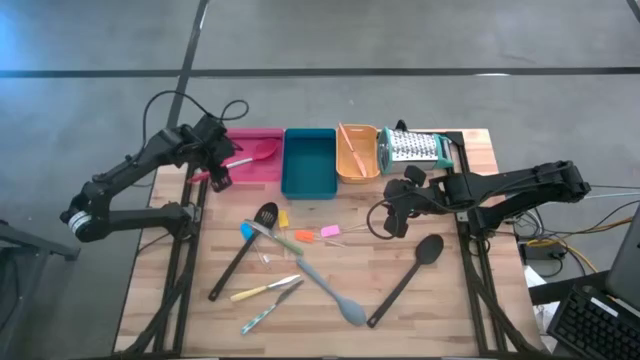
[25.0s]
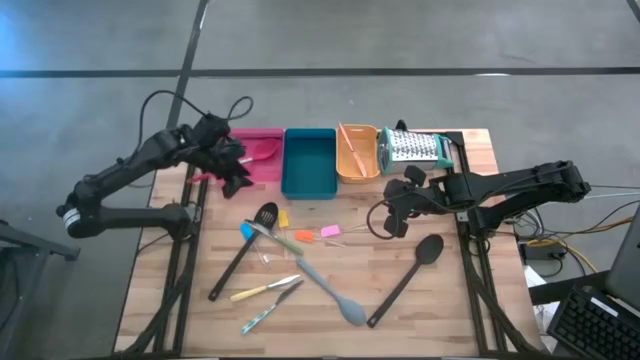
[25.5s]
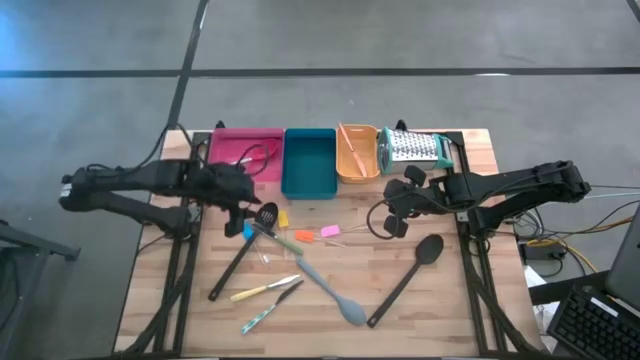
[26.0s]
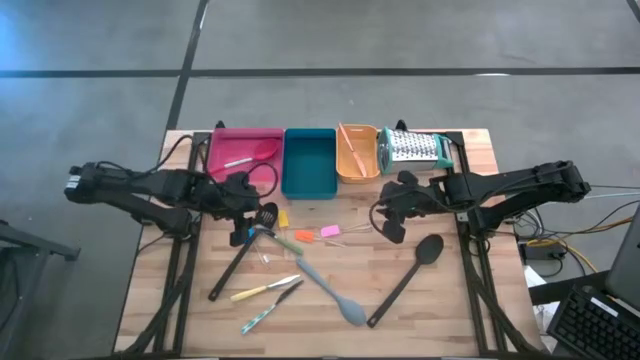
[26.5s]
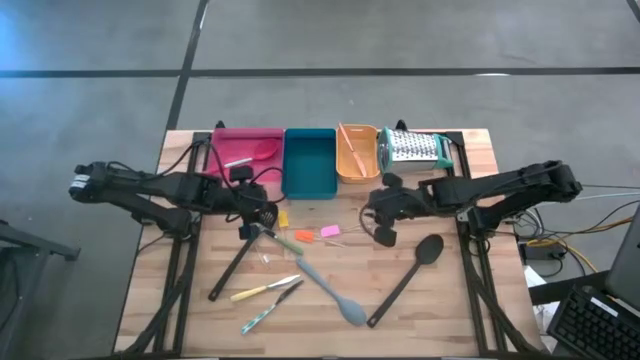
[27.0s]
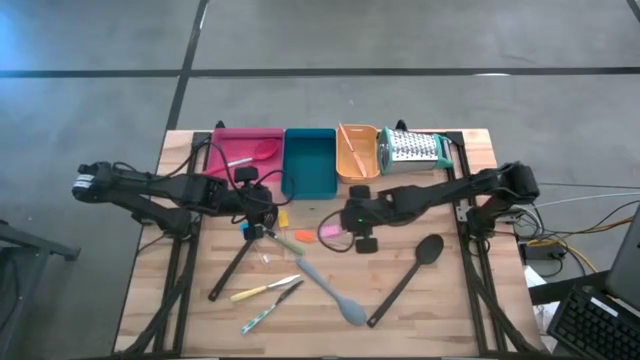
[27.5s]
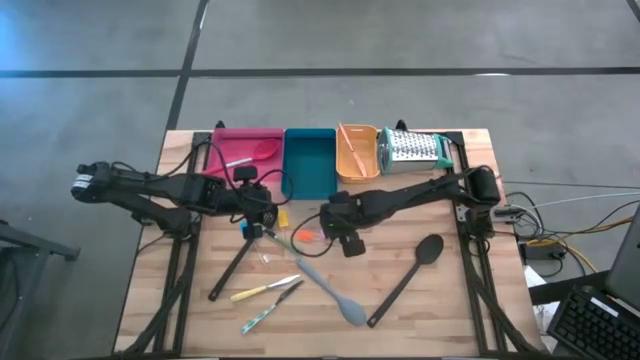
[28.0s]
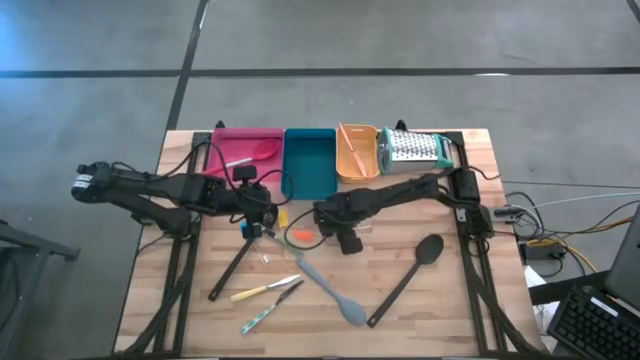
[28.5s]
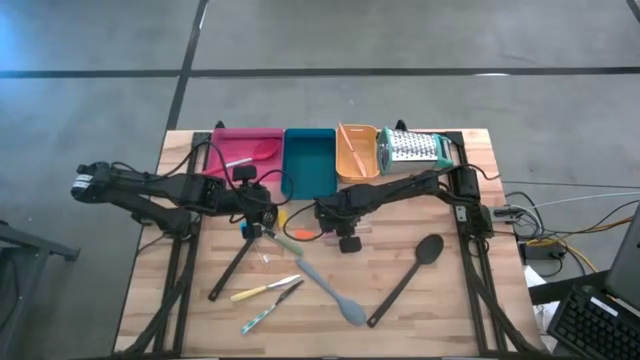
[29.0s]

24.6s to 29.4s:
Task: Pick & Place Kitchen Items
Put the pink spatula into the blue bin

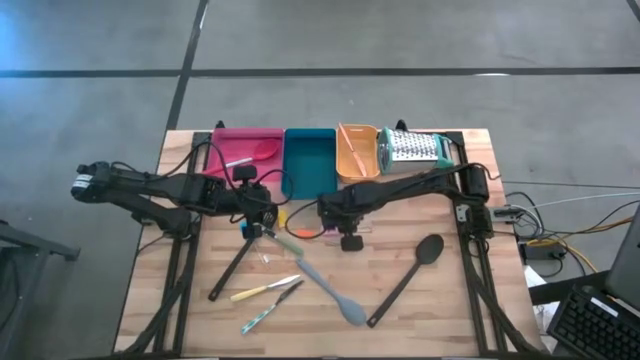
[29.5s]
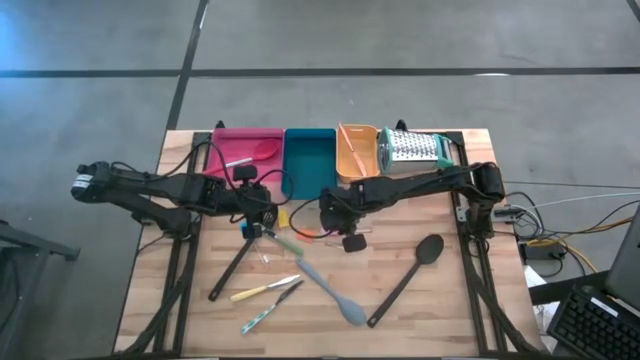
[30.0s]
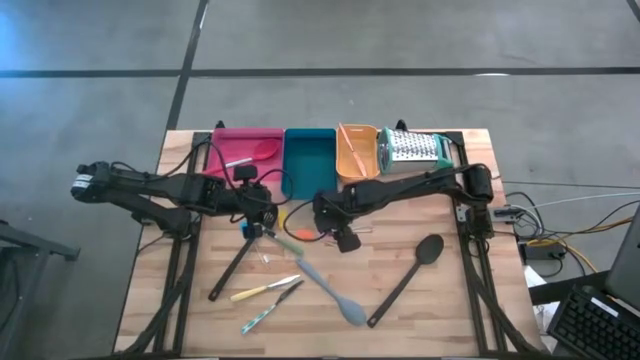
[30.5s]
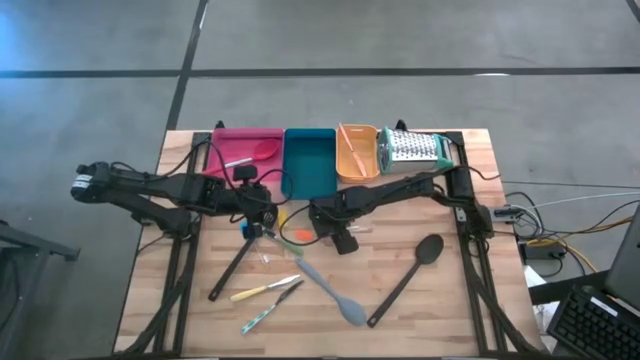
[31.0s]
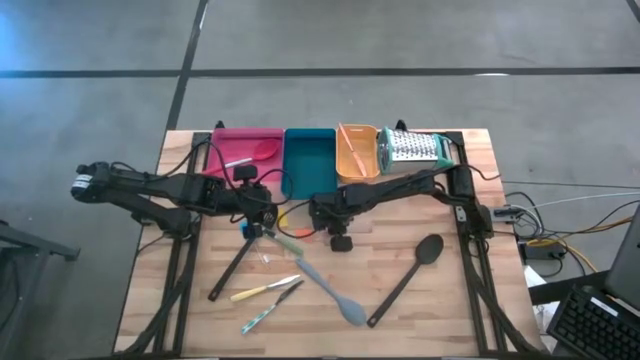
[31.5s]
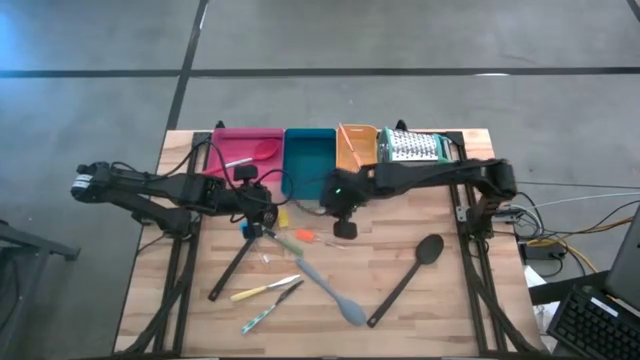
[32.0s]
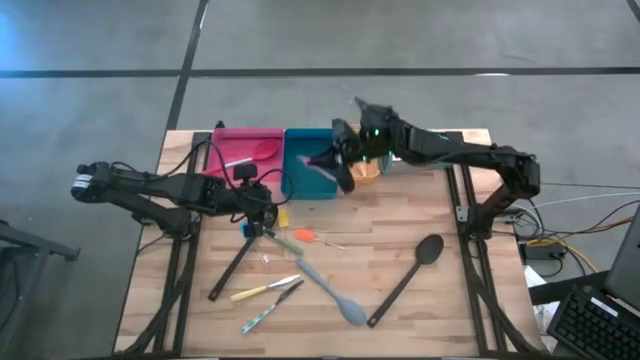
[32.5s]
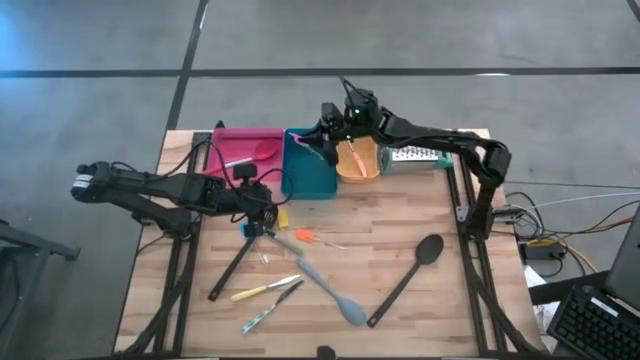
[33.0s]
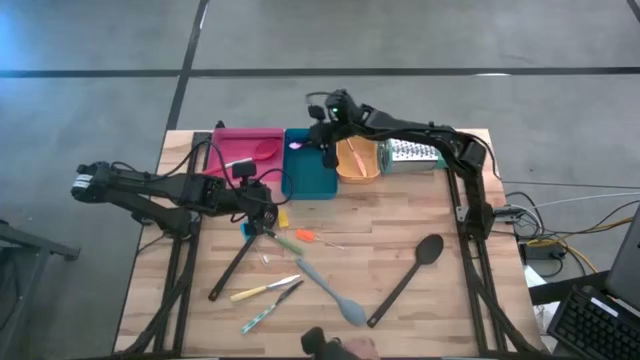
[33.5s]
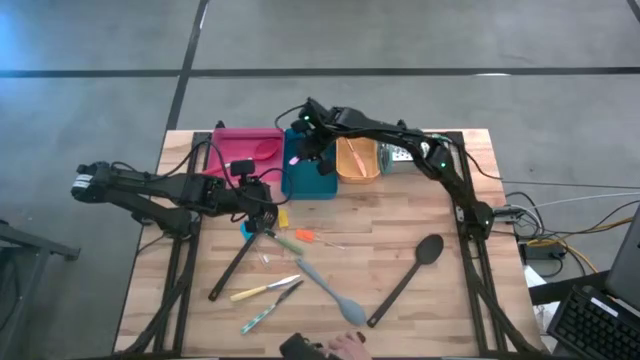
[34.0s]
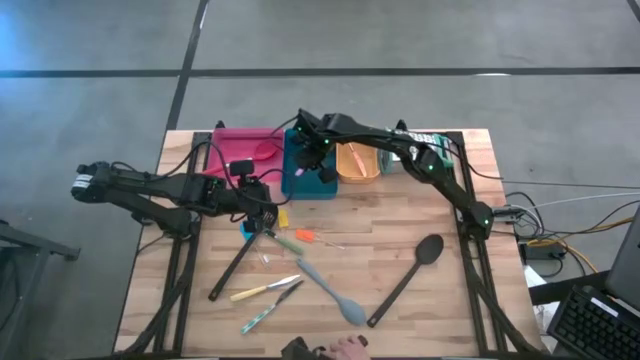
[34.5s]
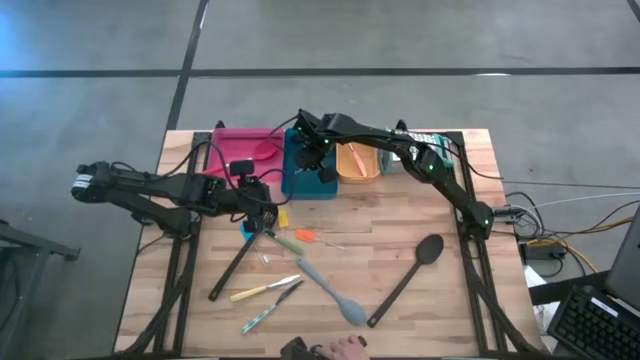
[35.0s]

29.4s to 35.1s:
Put the pink spatula into the blue bin

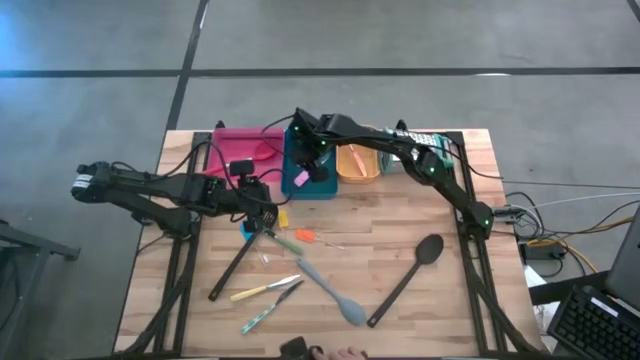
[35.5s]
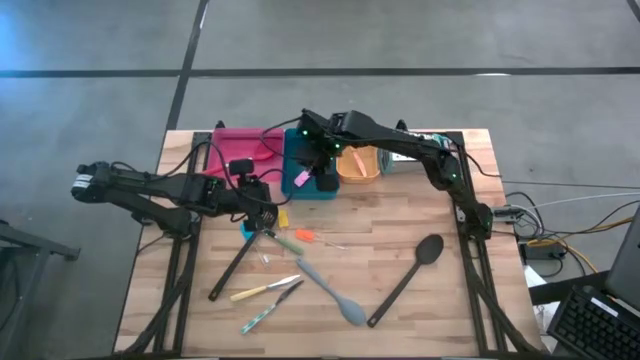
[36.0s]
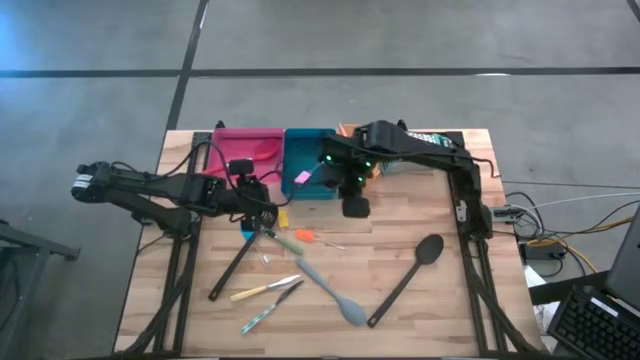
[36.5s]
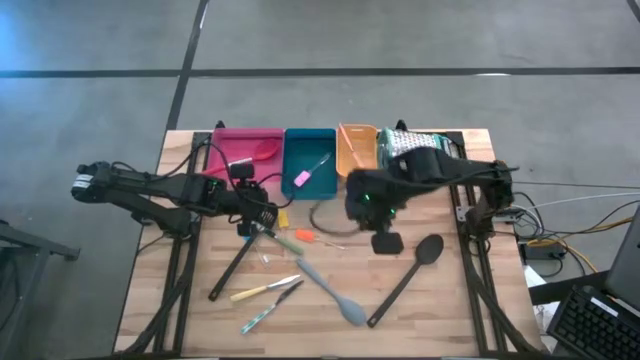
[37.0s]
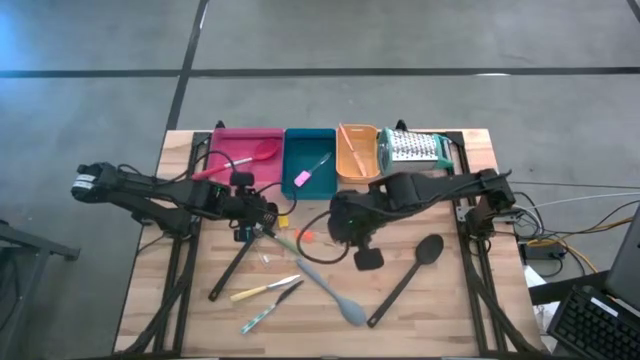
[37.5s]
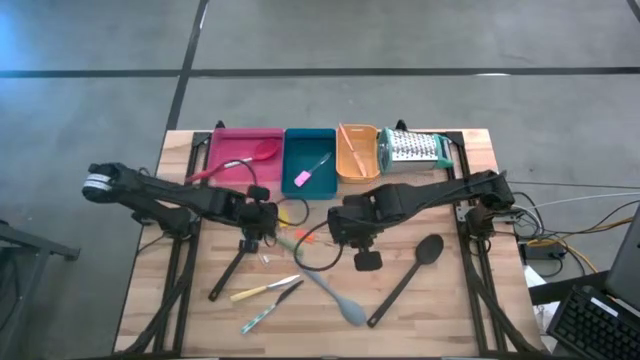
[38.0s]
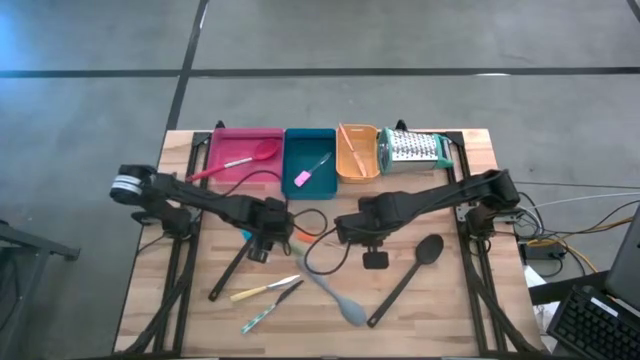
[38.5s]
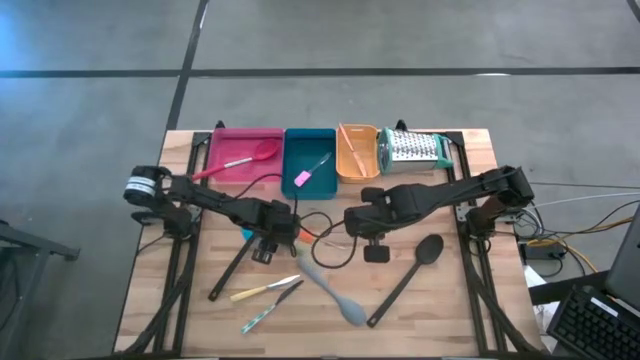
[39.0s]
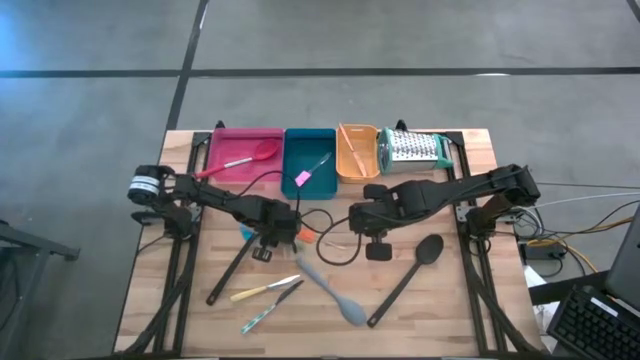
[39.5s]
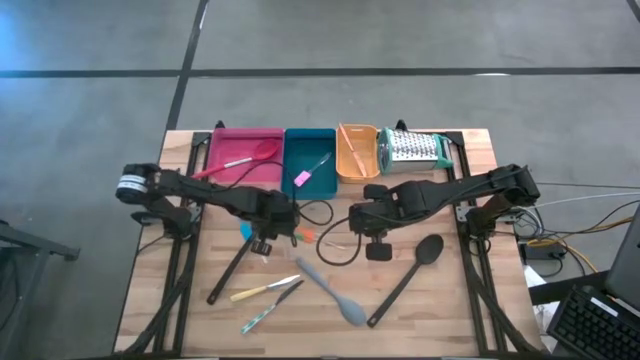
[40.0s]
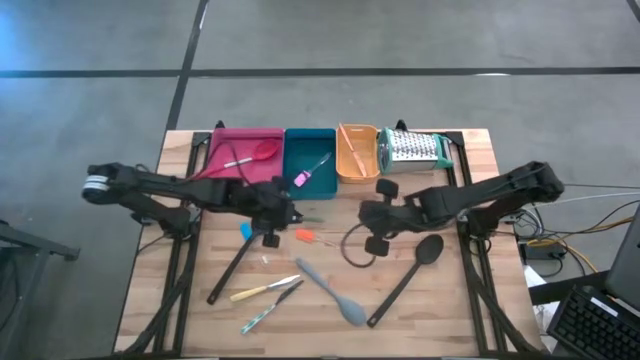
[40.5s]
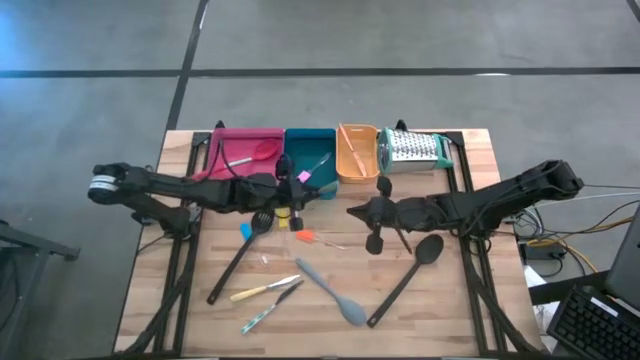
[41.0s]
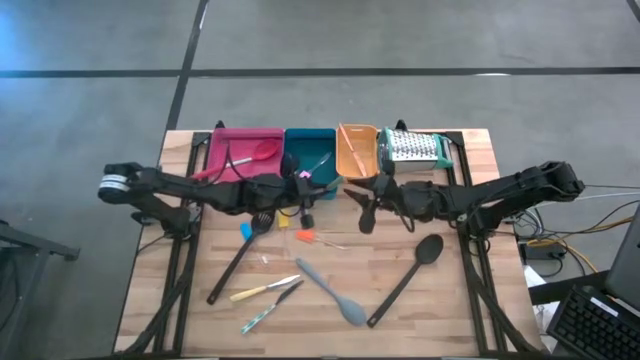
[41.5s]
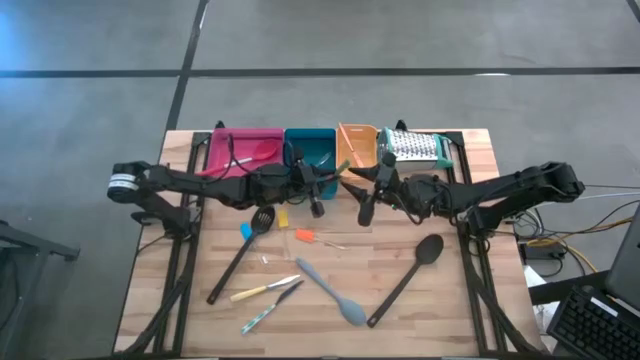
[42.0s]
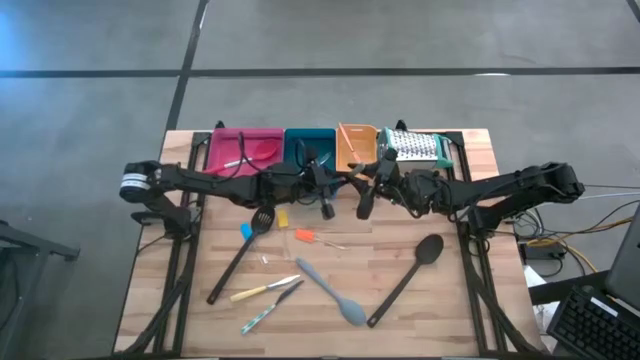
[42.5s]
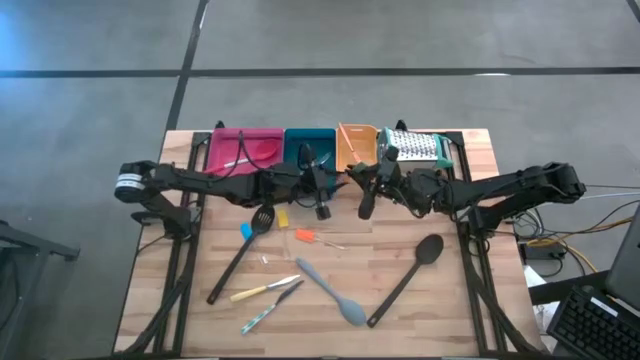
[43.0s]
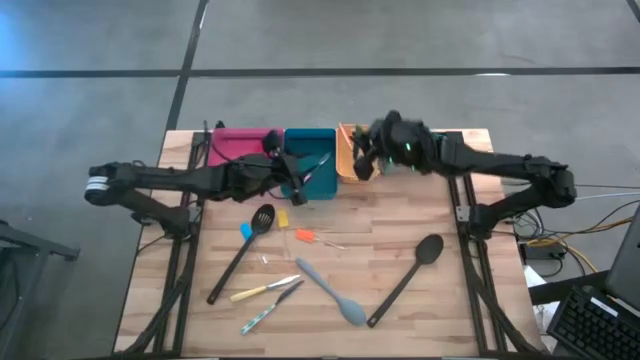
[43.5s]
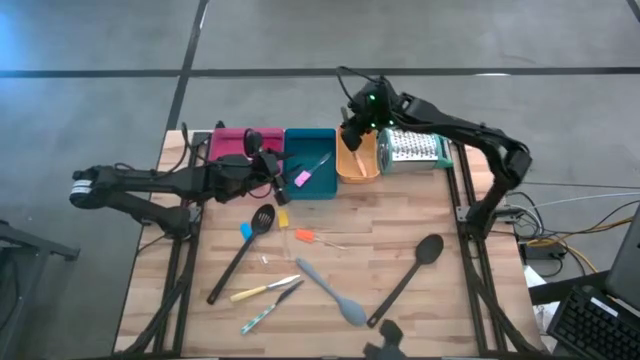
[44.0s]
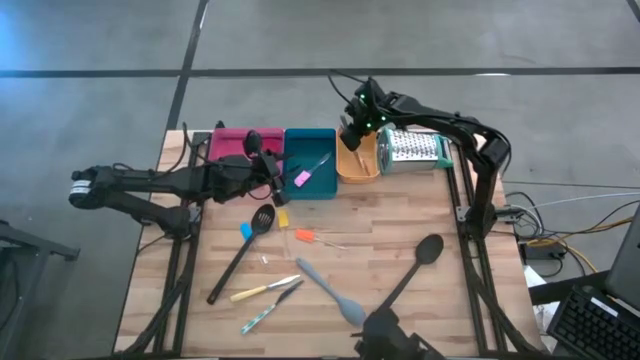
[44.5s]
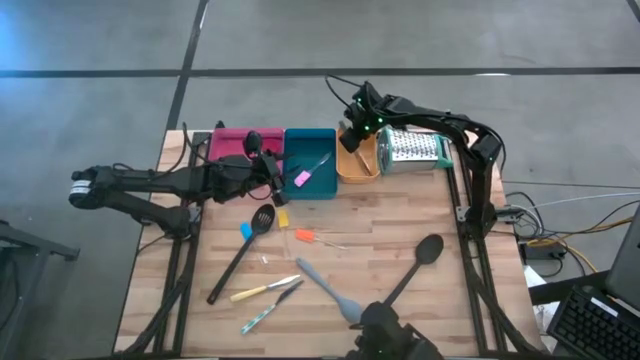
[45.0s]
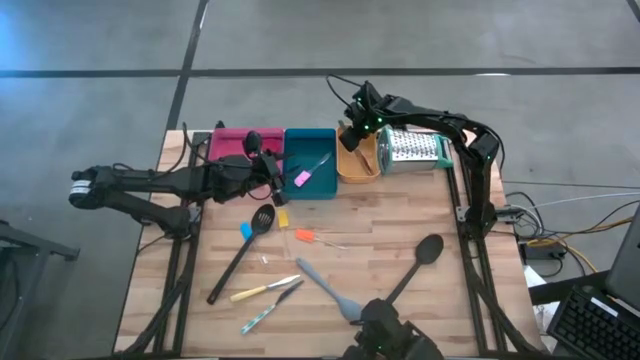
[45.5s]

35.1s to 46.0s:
Put the green knife into the yellow bin
